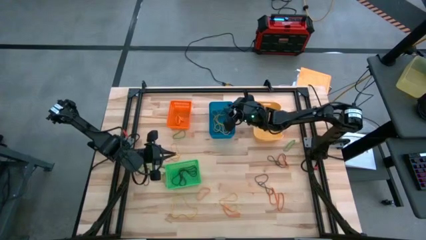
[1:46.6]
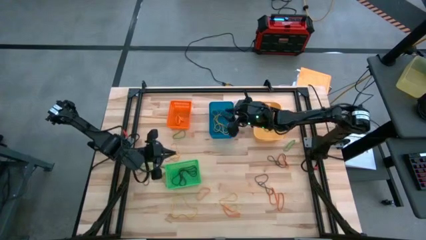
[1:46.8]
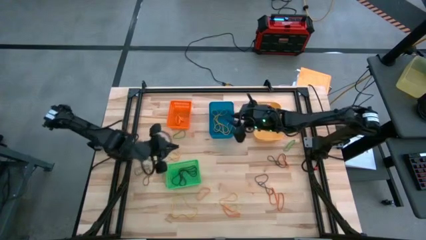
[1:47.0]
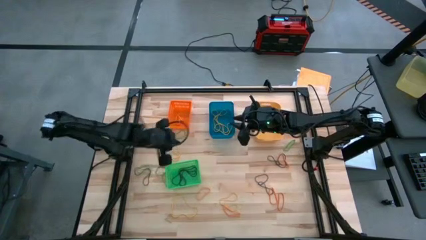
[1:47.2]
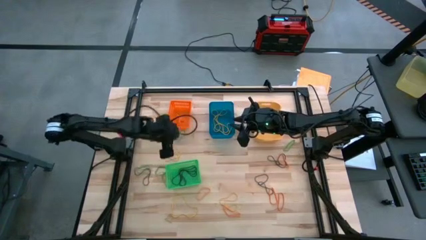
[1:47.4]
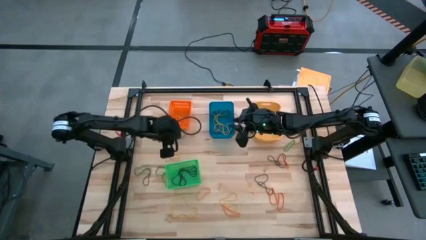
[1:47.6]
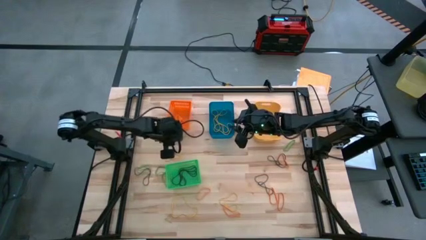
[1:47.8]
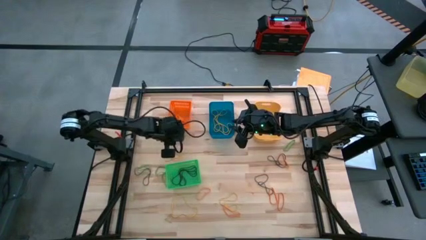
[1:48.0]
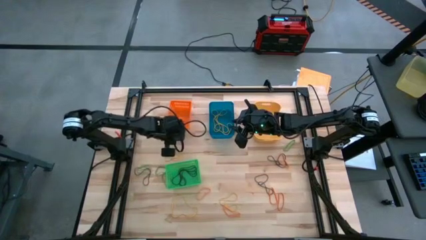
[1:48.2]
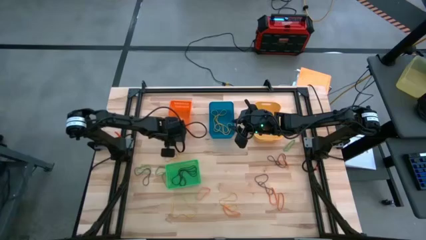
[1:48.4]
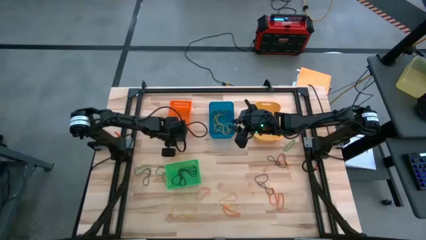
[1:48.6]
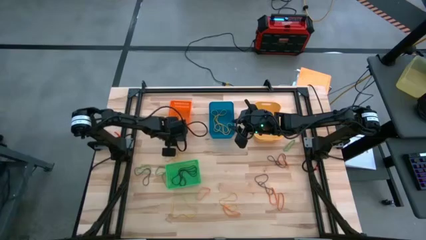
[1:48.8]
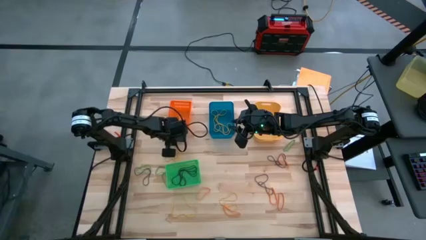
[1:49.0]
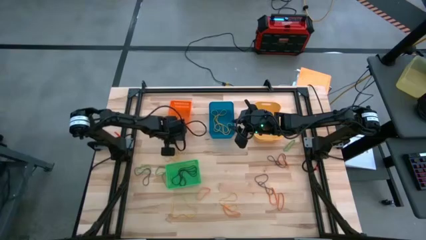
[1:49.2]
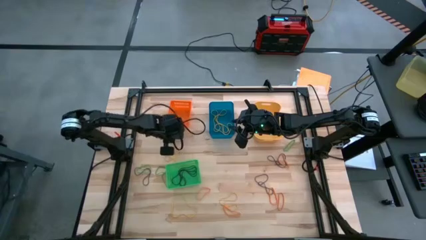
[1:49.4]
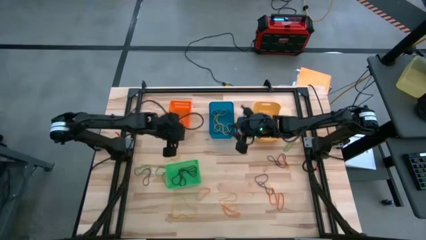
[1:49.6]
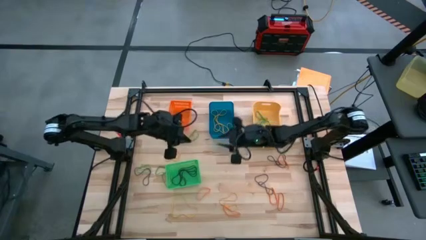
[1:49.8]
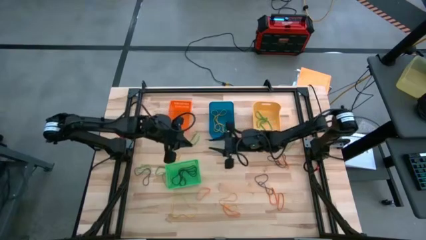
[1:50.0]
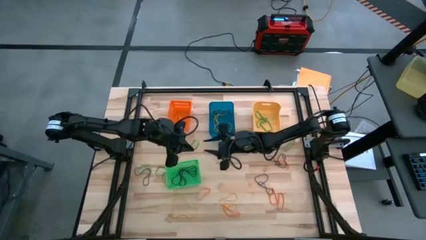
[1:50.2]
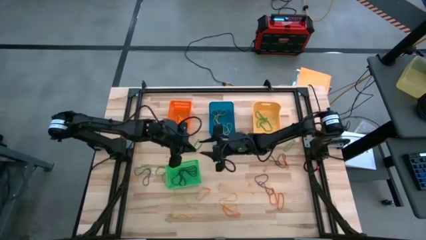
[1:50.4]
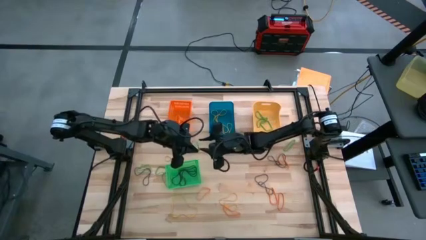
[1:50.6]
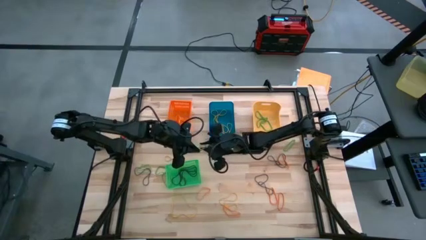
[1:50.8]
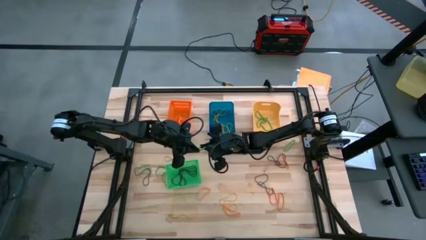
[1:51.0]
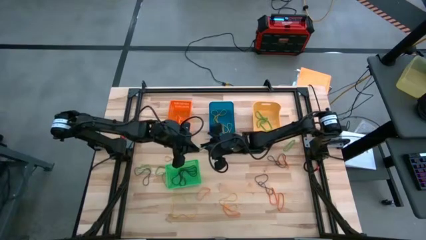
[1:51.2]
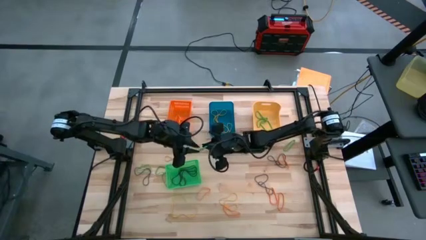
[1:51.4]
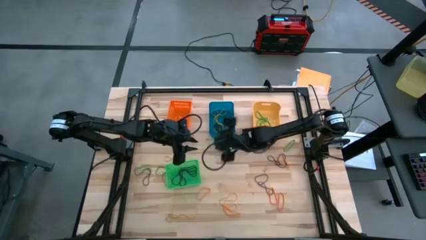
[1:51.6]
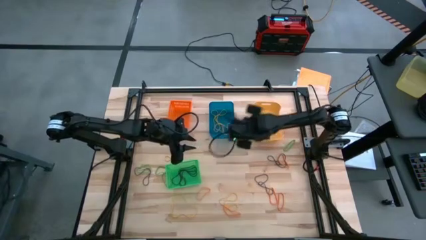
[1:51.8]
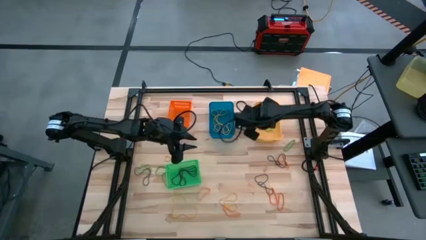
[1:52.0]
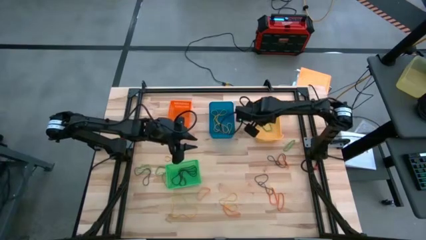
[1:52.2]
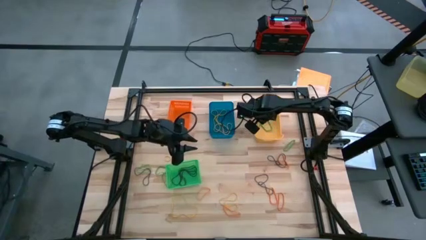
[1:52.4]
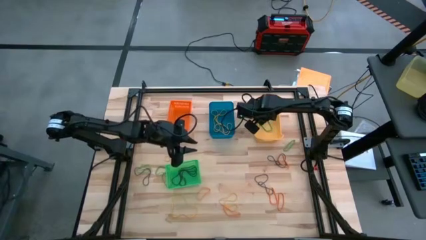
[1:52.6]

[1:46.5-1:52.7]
Task: Sort rubber bands into baskets
Put the green rubberband into the yellow bin

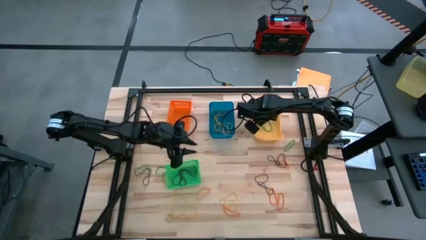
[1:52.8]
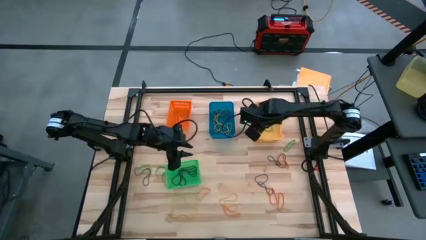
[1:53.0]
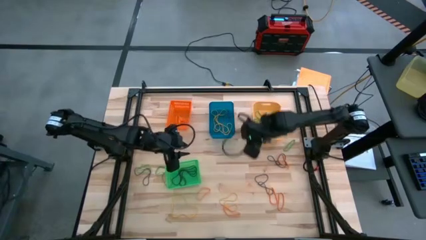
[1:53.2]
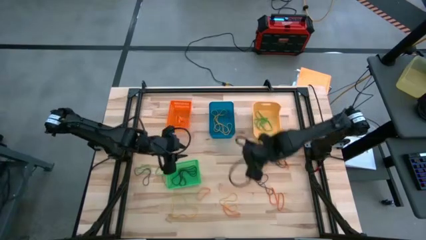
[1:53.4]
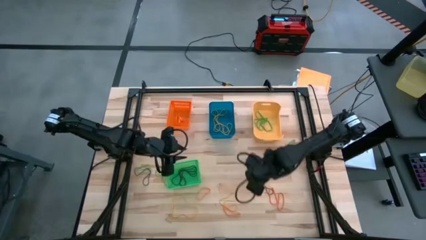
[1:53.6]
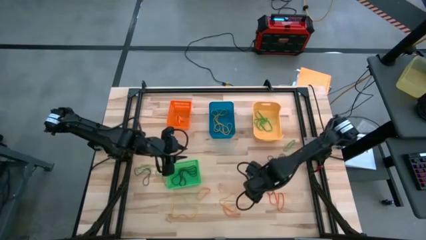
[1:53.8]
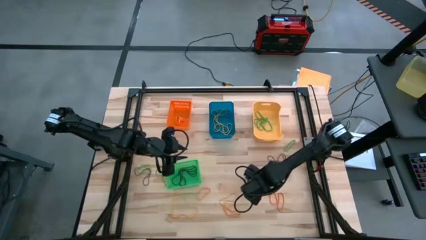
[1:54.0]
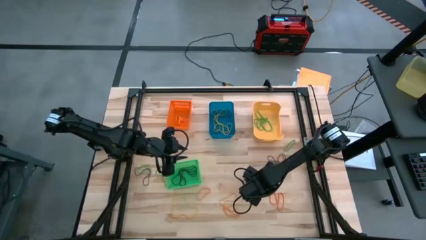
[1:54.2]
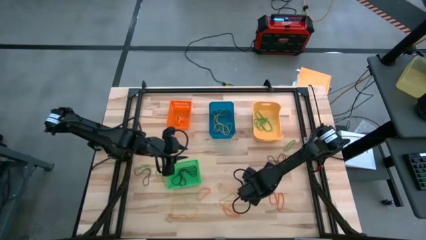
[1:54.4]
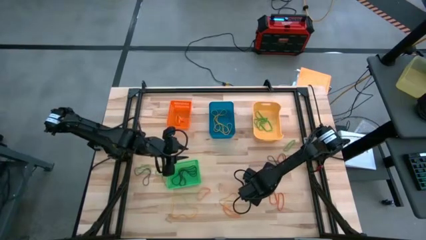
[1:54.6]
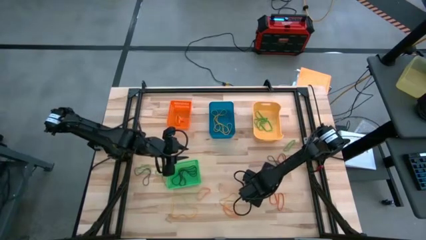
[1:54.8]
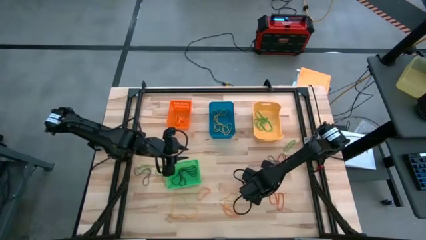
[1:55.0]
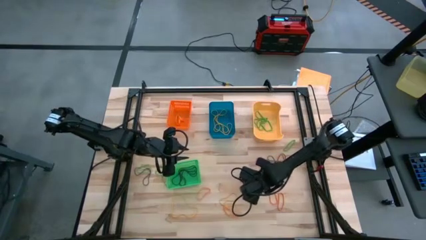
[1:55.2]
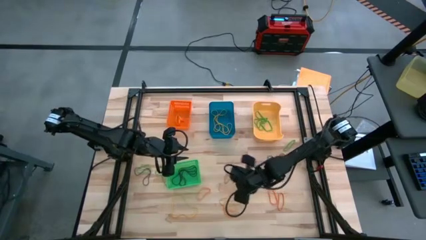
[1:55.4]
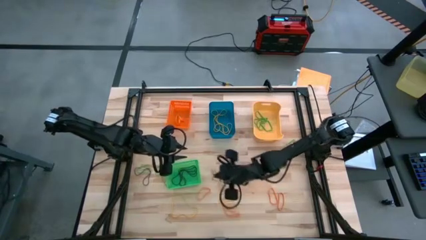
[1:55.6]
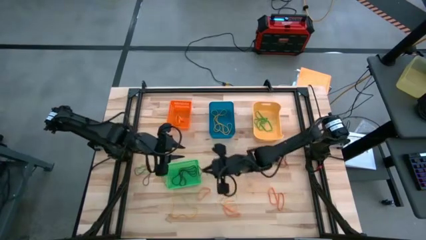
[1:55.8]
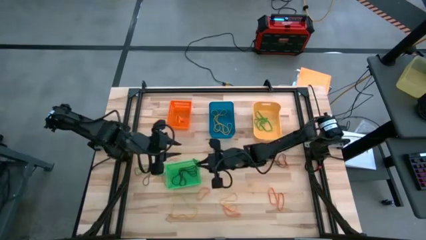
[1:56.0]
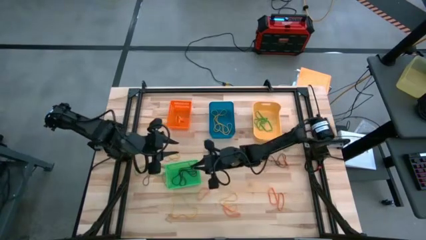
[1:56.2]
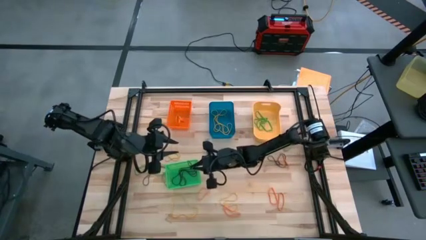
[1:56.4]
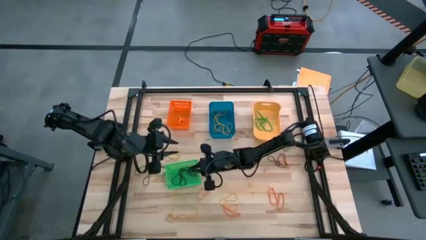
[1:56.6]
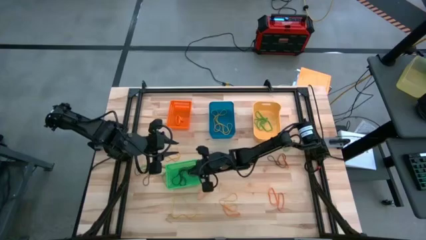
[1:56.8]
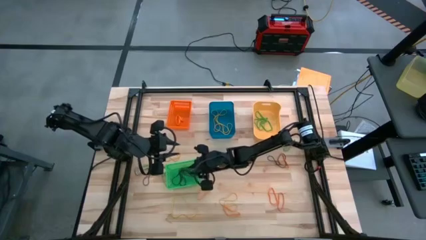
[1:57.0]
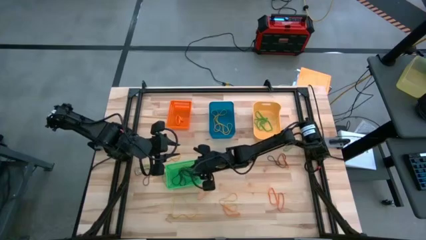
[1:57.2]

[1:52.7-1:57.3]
Put the violet rubberband into the green bin

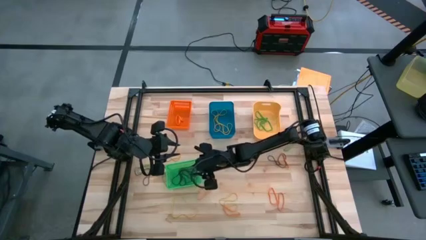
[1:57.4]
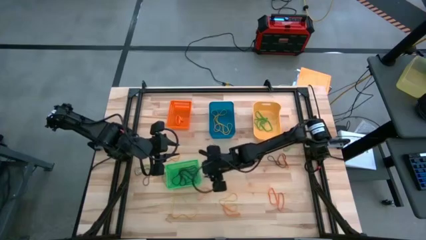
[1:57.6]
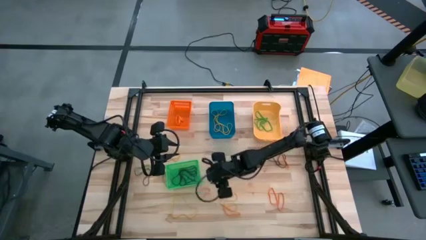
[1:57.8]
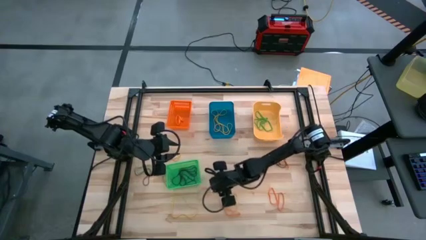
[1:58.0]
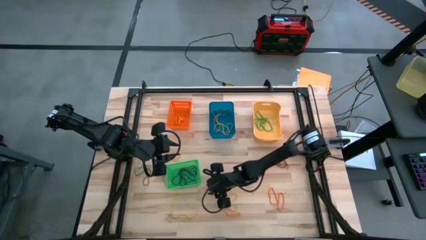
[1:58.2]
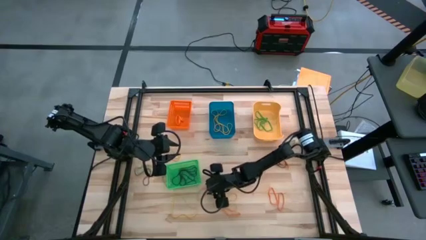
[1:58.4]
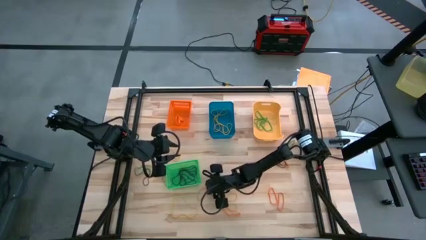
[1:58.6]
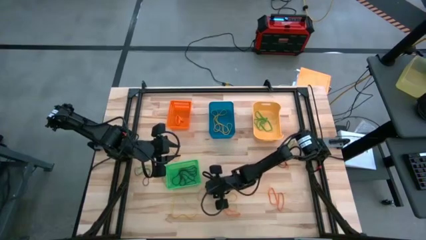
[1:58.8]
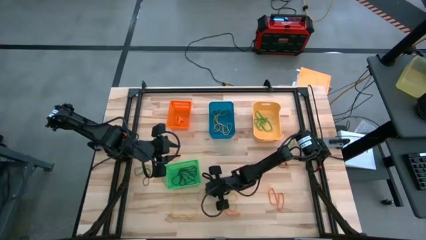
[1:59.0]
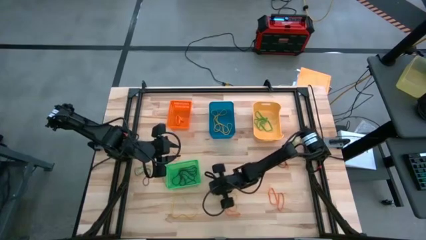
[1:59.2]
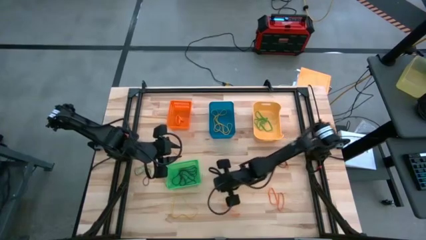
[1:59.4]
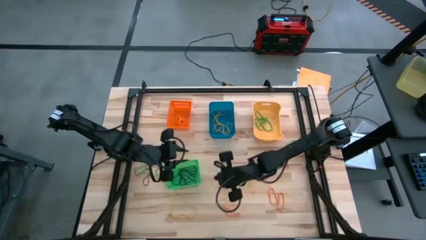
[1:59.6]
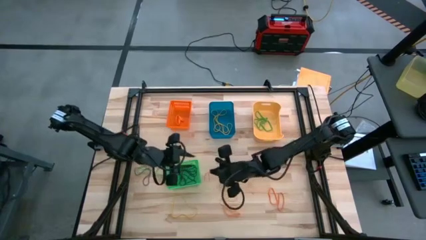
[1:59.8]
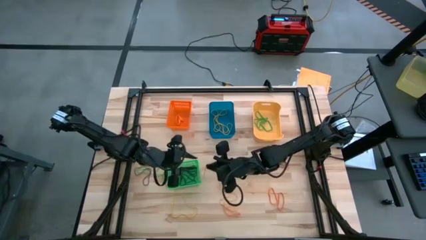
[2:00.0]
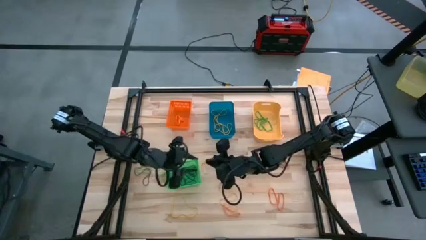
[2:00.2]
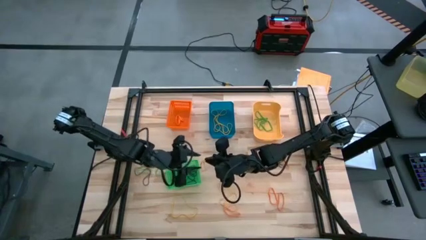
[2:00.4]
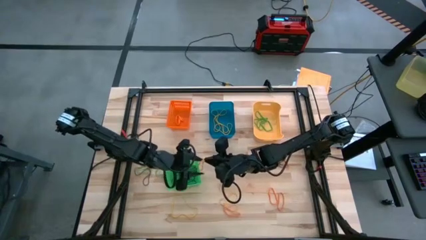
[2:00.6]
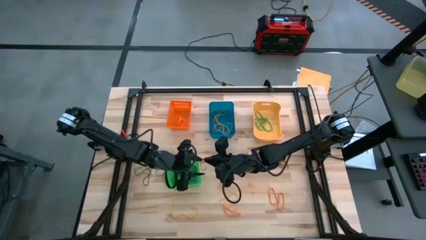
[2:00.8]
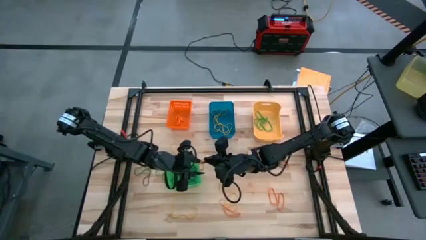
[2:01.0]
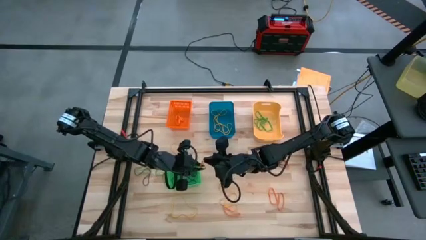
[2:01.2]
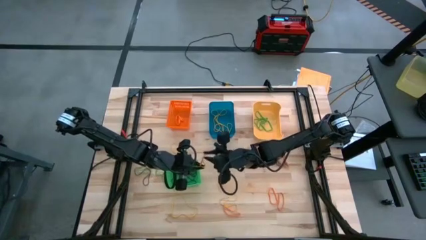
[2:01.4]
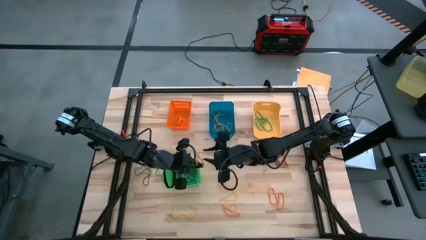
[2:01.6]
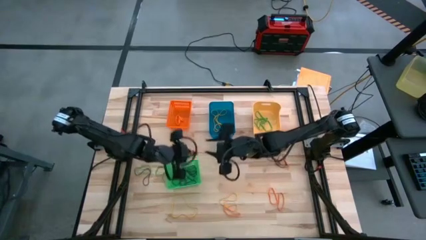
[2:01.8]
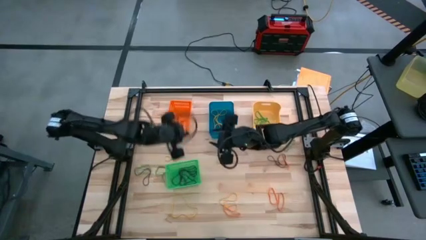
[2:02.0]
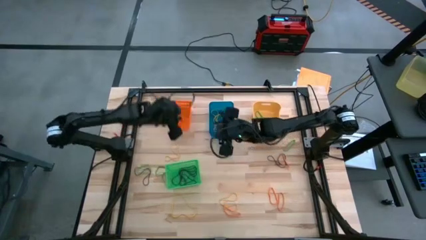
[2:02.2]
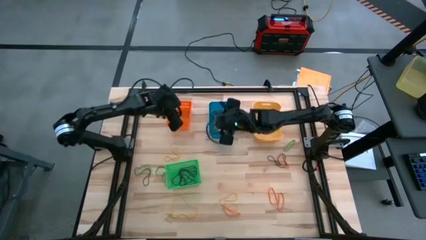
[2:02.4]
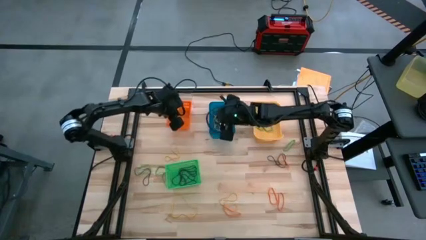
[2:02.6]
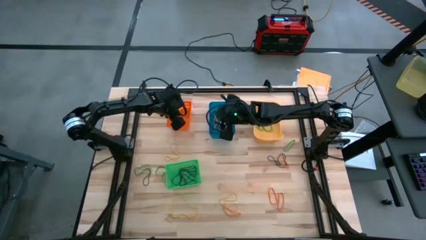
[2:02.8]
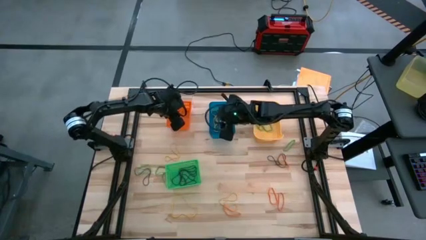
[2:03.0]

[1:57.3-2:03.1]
Put the orange rubberband into the orange bin
